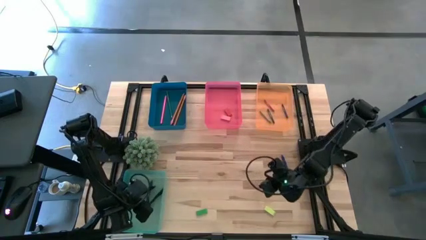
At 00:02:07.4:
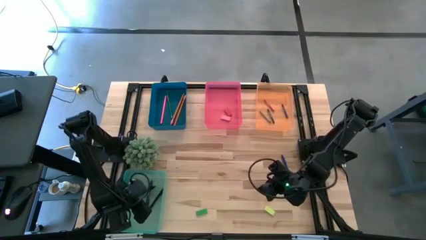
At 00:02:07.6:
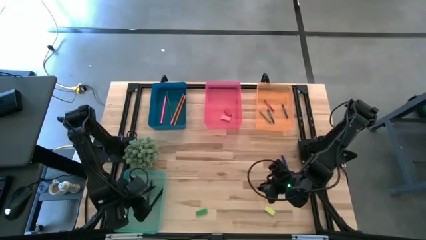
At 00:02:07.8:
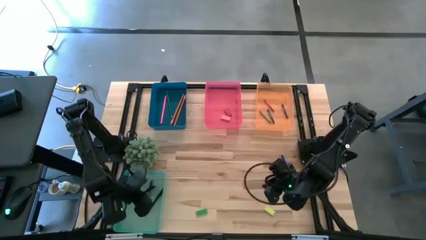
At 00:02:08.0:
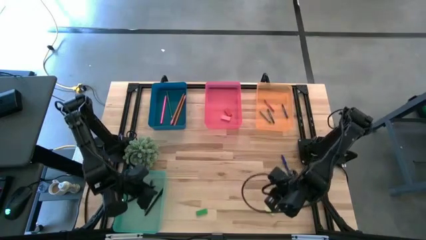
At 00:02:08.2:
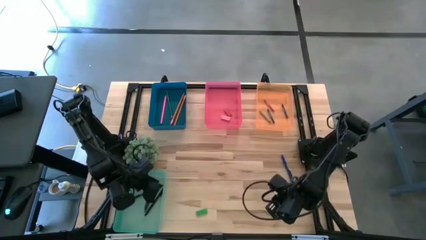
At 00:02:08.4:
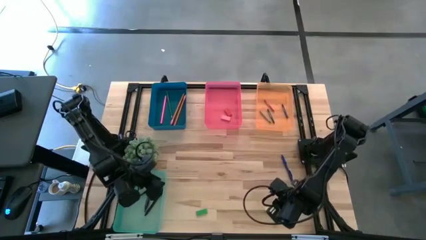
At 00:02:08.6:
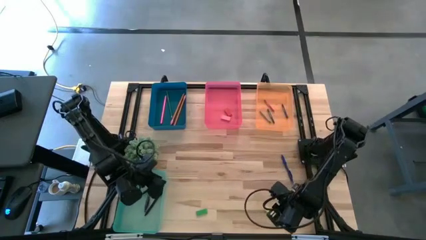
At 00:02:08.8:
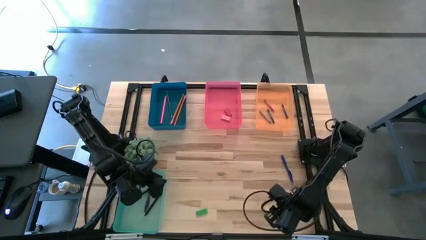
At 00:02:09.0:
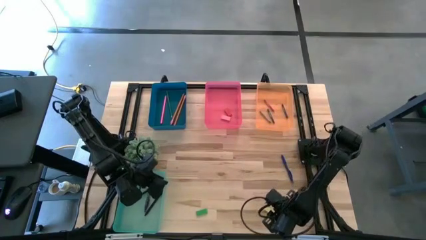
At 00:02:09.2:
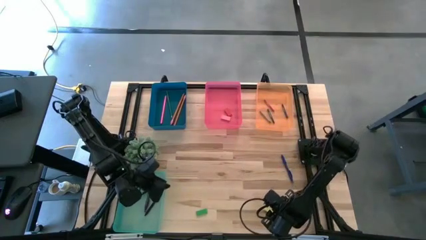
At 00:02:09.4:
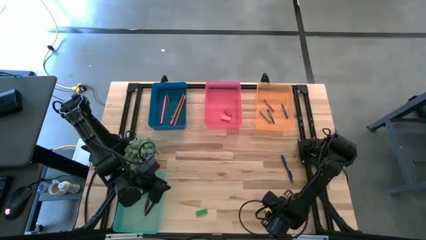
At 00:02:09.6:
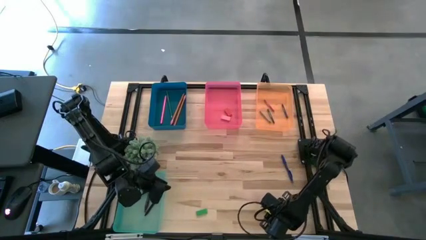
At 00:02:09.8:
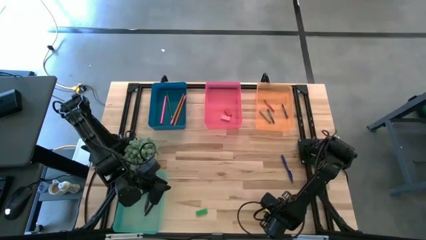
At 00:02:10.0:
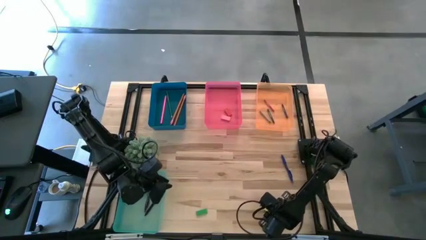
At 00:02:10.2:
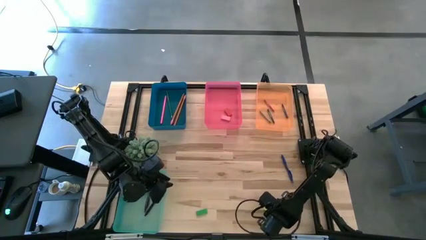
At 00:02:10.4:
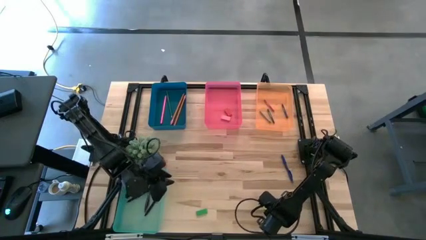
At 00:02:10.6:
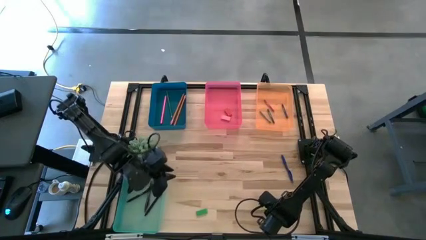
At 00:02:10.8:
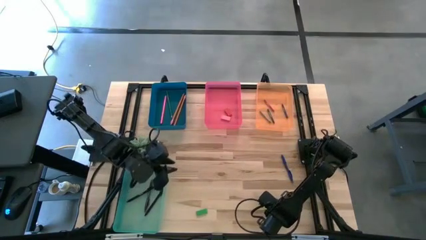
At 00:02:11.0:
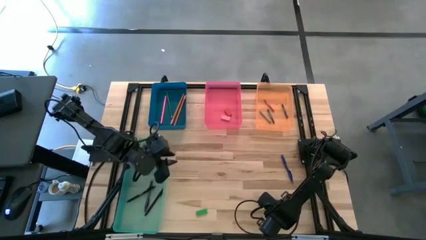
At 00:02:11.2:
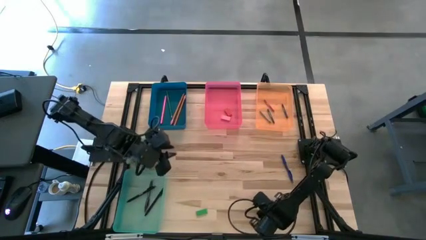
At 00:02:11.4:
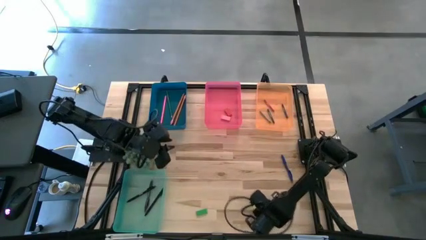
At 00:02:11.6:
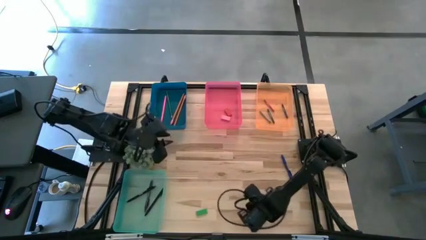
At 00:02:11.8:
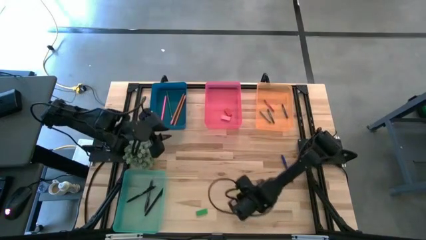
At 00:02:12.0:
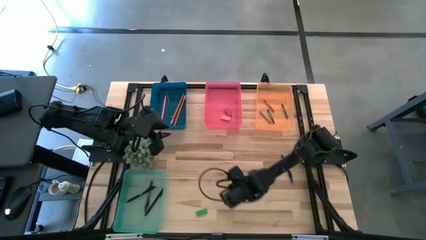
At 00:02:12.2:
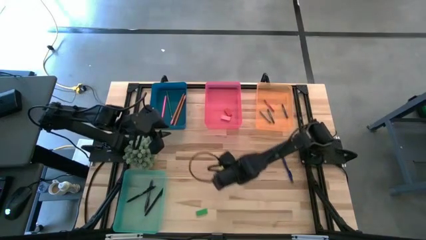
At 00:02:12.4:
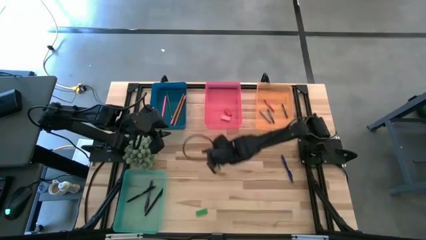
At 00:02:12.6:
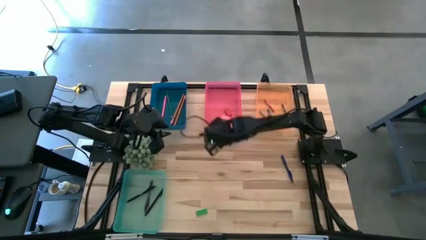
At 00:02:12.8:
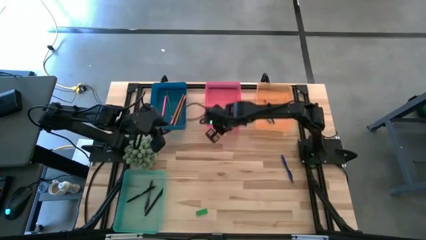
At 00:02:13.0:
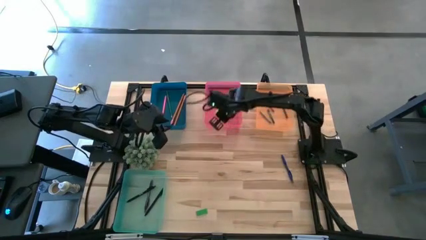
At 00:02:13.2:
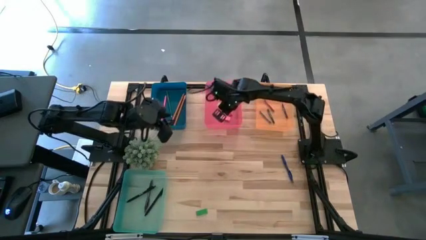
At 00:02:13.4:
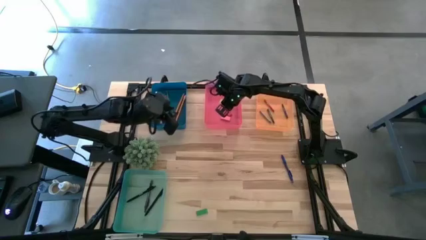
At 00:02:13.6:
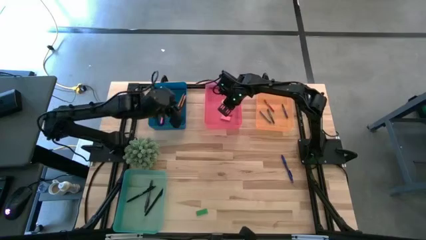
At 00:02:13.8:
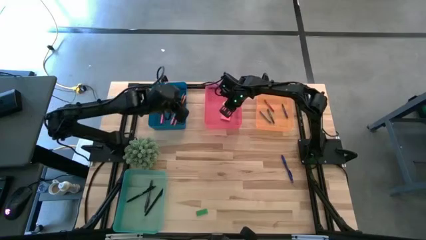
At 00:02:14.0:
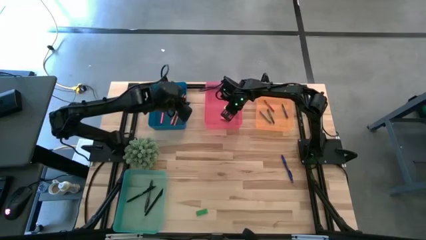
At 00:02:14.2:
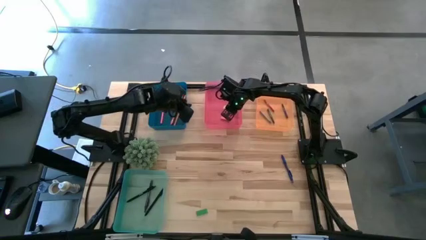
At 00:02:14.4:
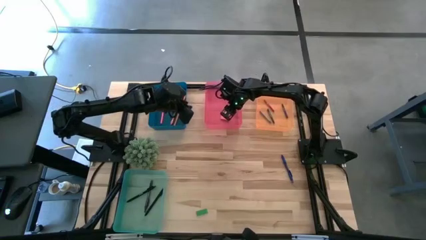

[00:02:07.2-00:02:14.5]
Task: Sort crayons/erasers/pens/pencils in bins
Put the light green eraser into the pink bin

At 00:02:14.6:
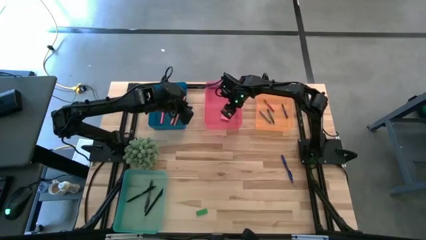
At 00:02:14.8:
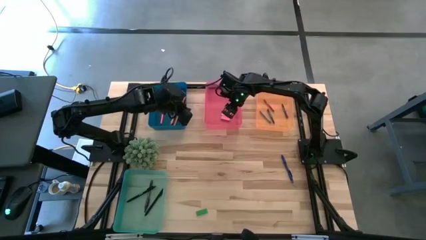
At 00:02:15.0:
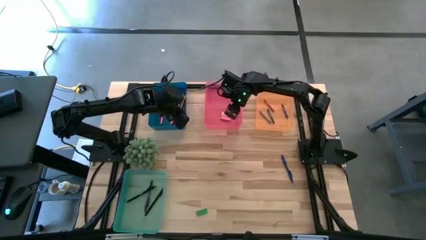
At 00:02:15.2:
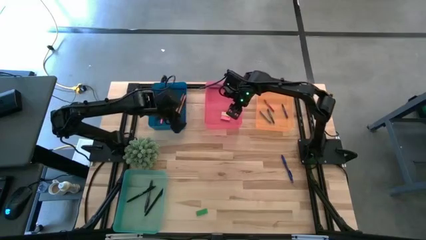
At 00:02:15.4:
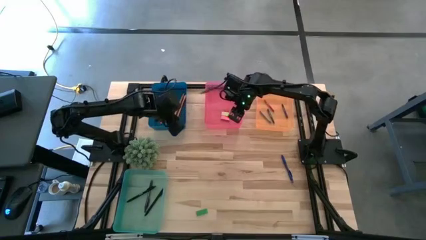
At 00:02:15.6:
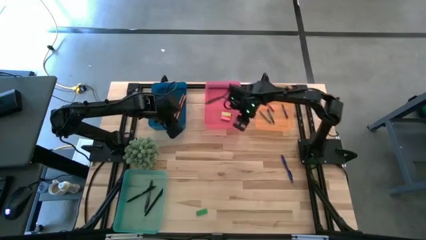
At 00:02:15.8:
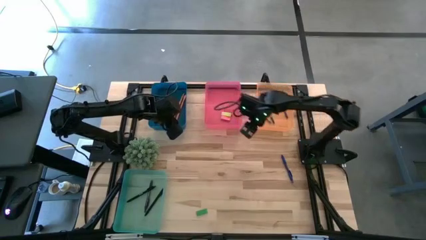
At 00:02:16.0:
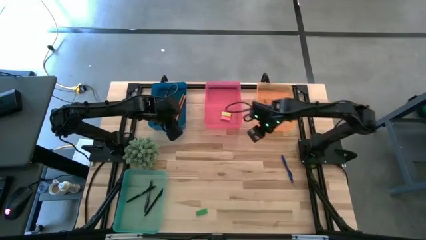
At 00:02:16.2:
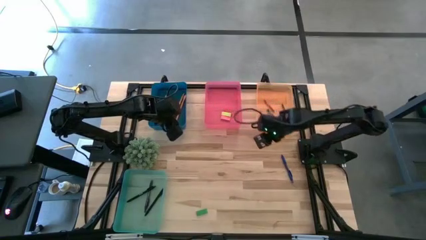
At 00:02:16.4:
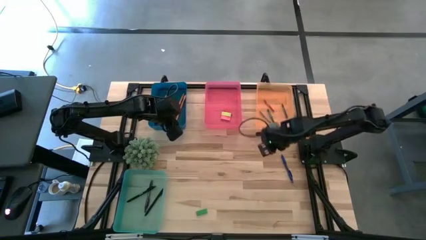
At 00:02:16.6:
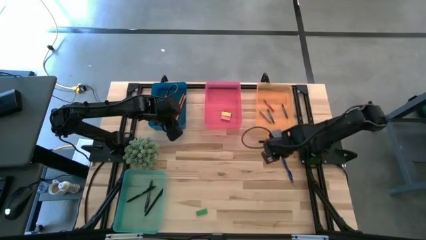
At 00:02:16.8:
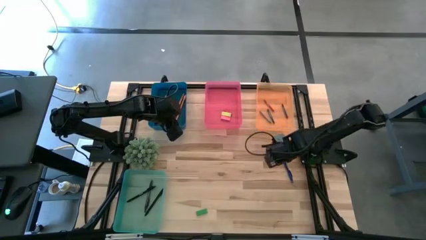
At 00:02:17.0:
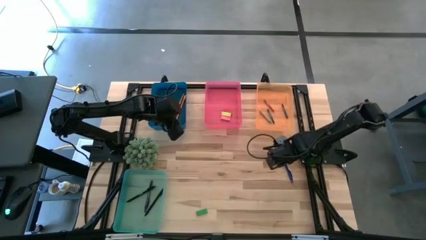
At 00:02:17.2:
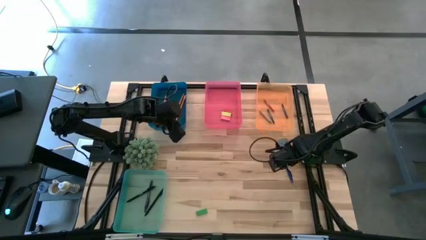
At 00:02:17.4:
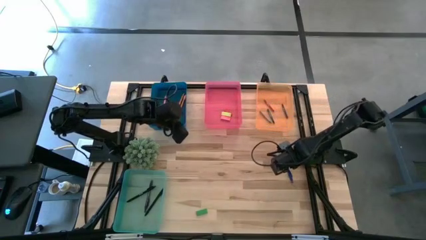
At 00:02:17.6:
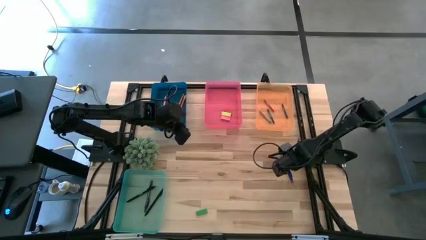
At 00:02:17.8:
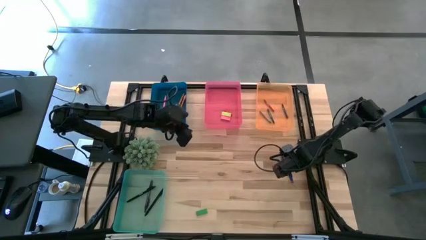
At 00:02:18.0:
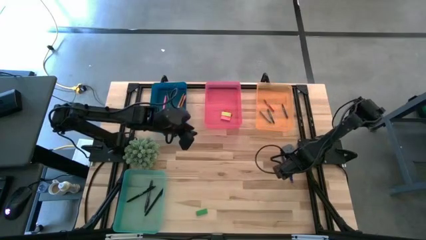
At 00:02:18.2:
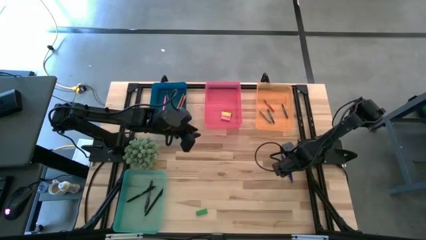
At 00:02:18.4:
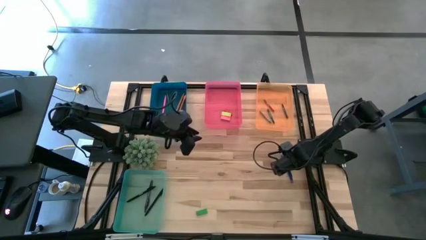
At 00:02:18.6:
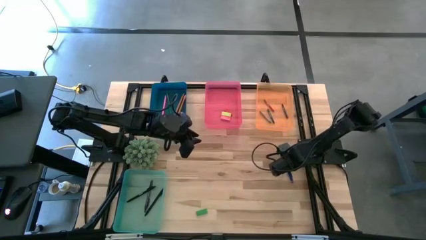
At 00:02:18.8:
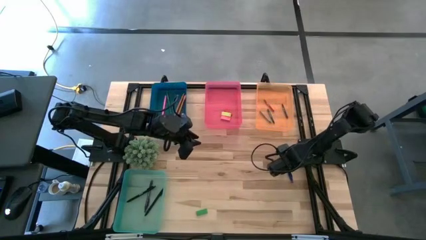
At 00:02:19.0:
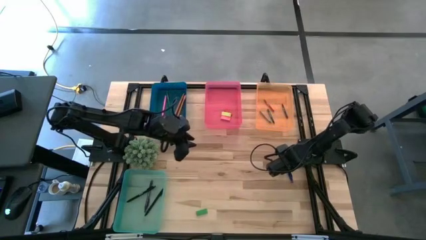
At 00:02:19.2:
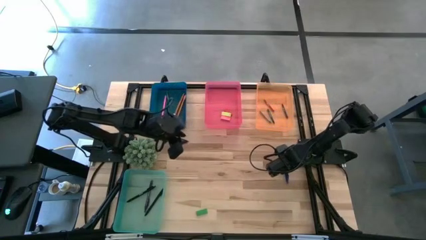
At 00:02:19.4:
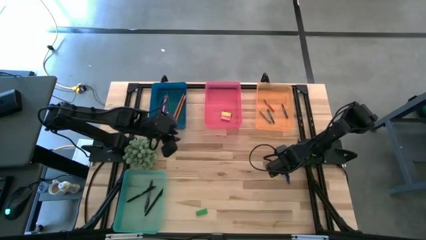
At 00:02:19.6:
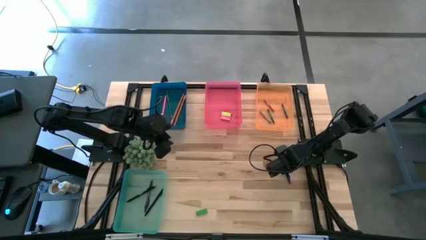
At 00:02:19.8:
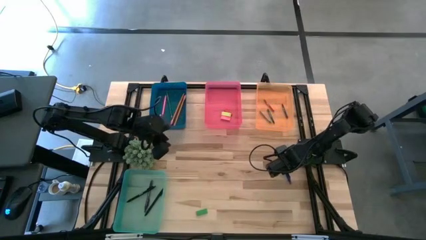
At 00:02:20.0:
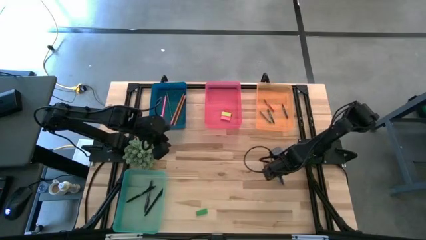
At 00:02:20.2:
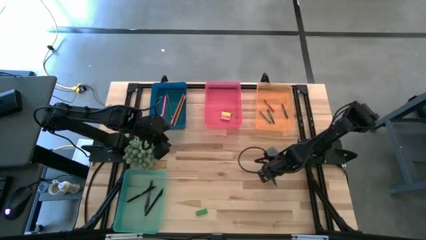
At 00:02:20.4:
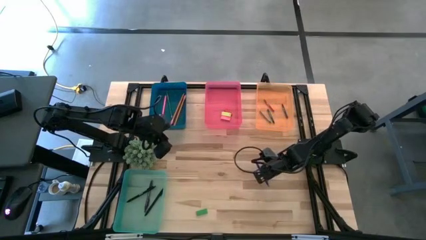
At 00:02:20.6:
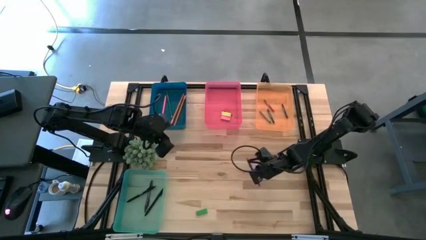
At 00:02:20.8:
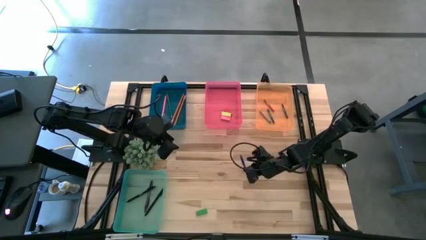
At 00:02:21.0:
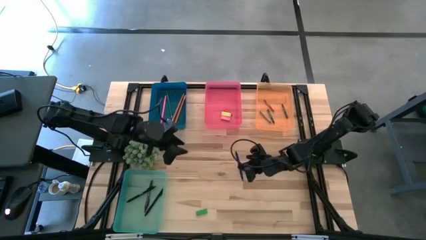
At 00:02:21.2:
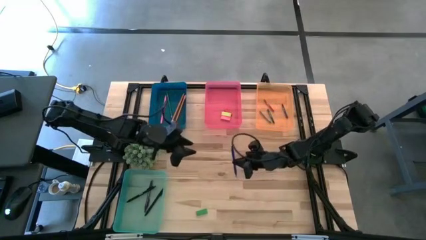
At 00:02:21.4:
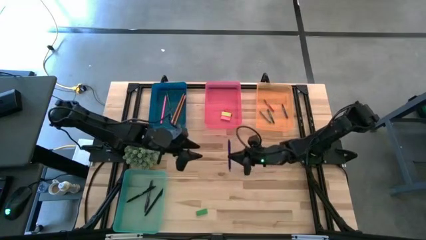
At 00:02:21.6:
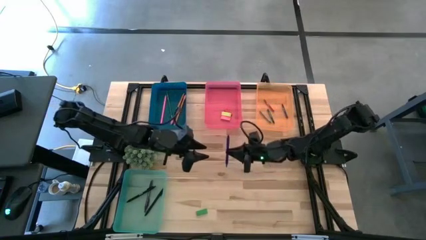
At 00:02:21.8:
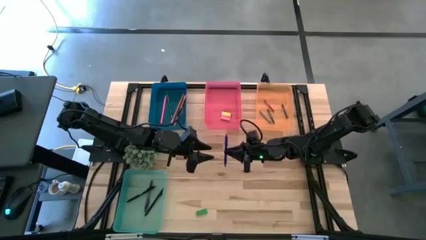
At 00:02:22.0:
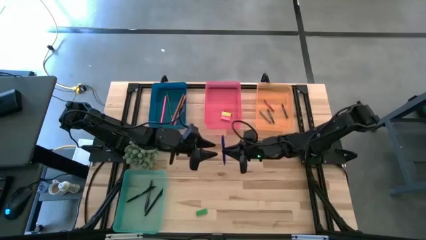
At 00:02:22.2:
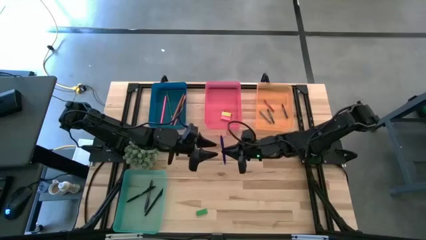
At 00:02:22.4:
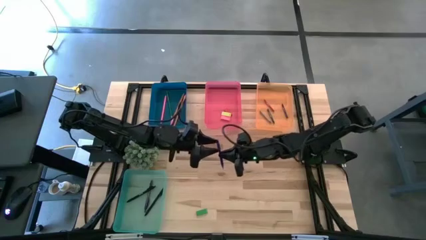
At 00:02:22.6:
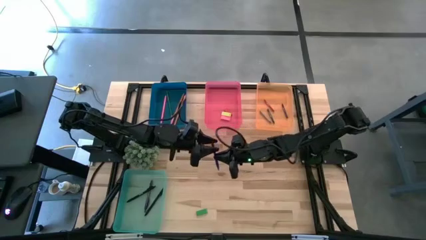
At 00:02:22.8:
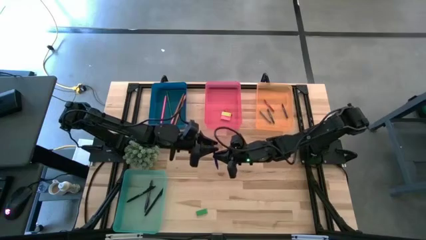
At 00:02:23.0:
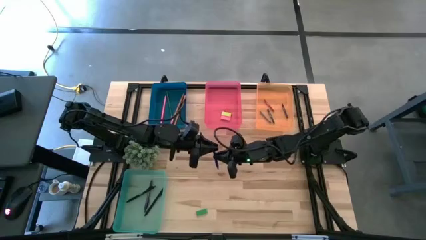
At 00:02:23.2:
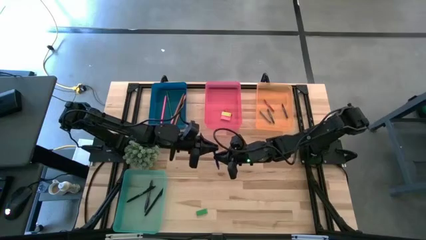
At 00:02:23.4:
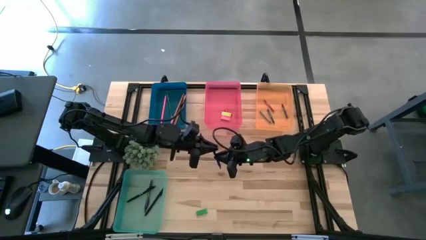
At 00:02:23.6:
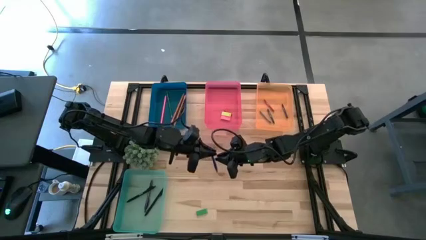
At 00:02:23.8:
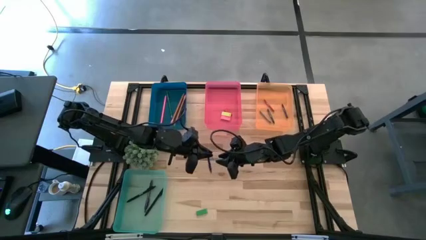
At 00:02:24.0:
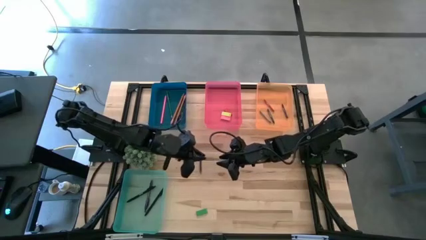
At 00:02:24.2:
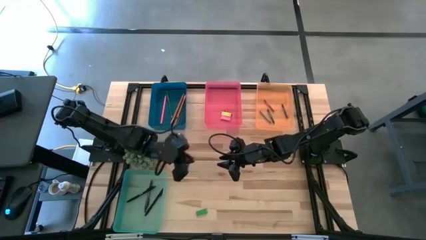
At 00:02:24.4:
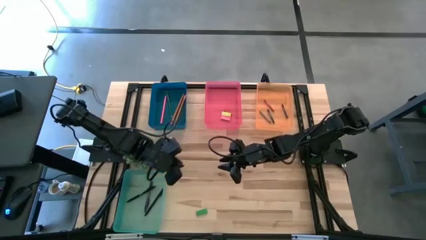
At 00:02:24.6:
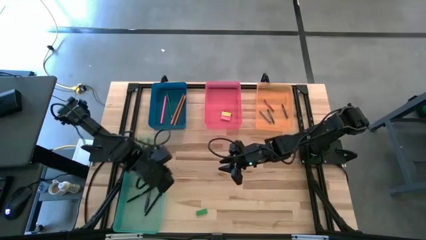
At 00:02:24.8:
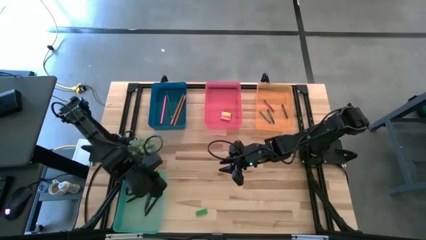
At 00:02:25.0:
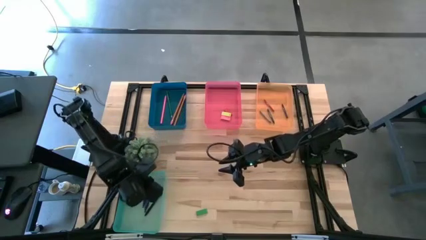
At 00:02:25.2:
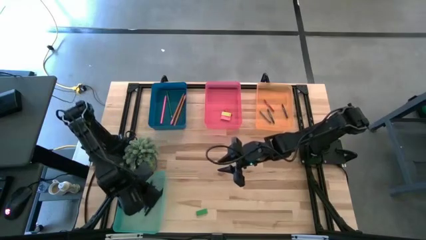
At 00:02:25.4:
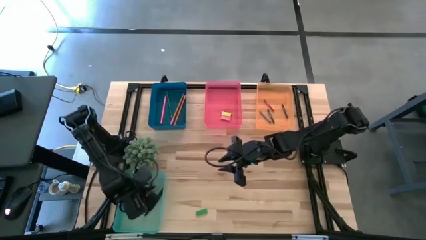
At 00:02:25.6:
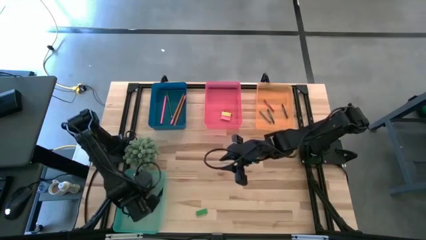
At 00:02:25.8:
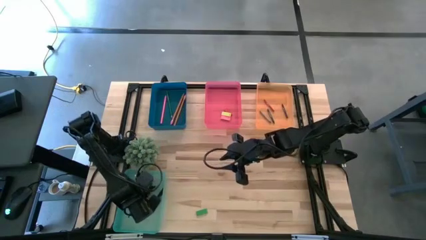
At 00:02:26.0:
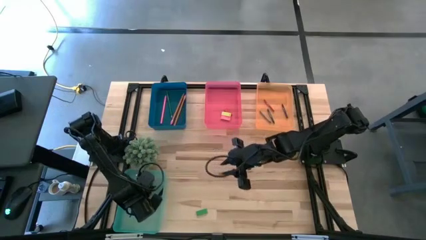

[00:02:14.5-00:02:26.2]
Put the blue pen into the green bin
